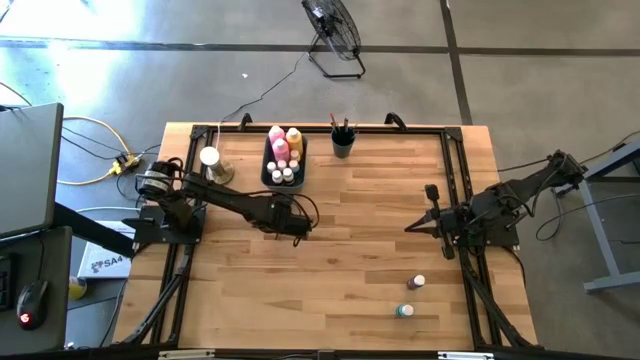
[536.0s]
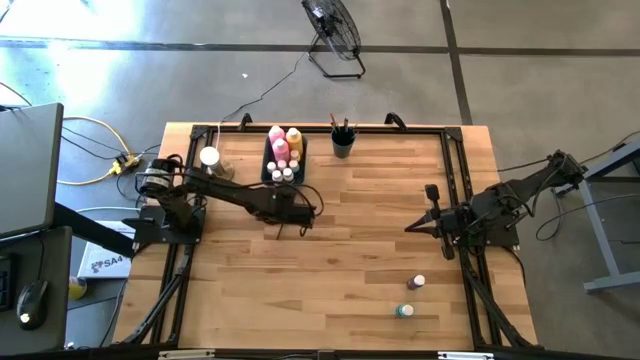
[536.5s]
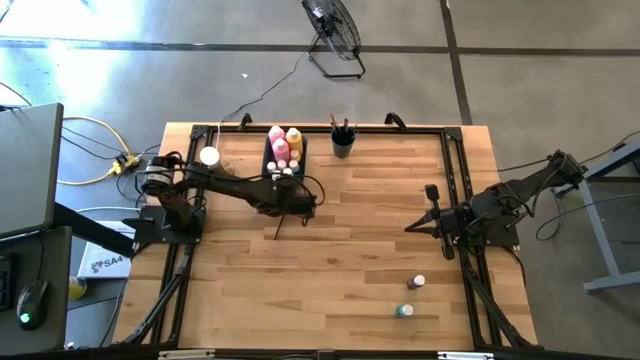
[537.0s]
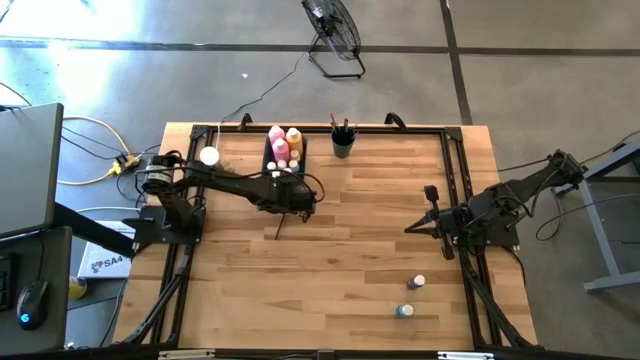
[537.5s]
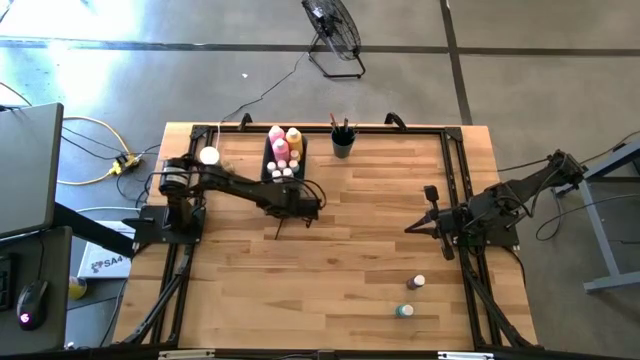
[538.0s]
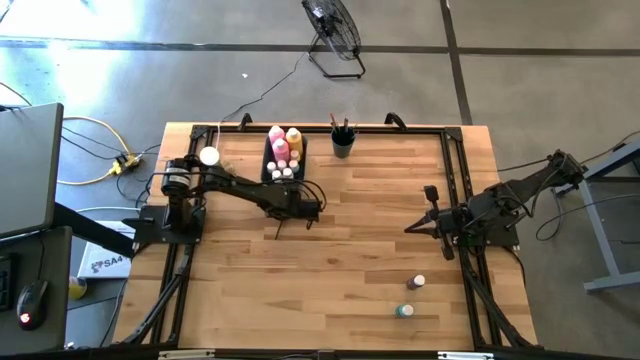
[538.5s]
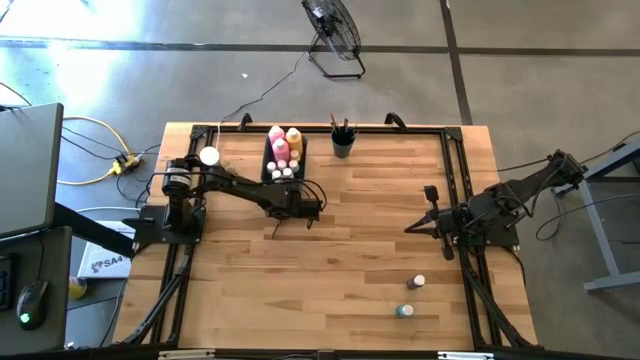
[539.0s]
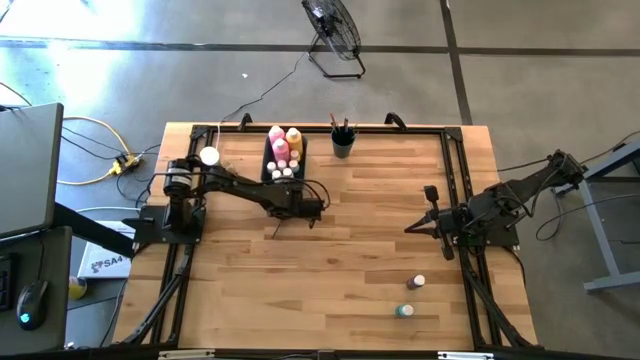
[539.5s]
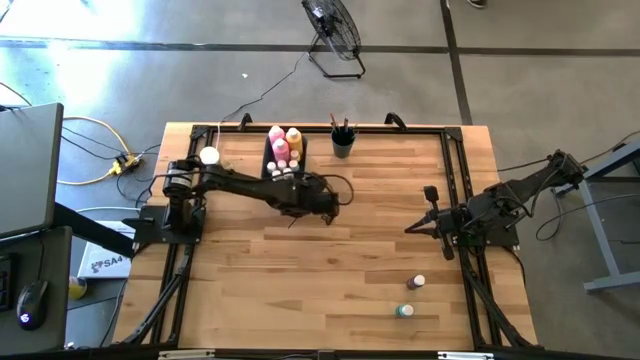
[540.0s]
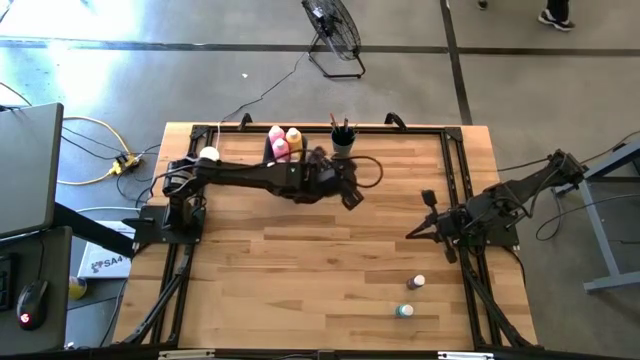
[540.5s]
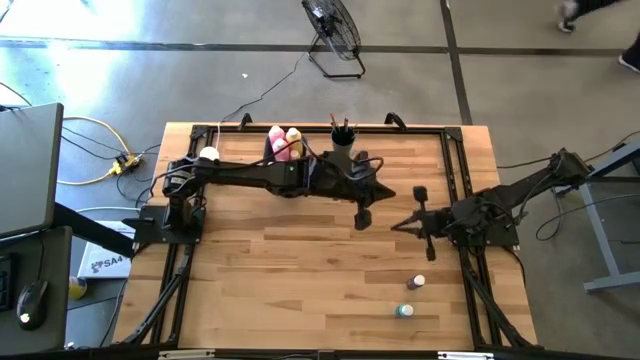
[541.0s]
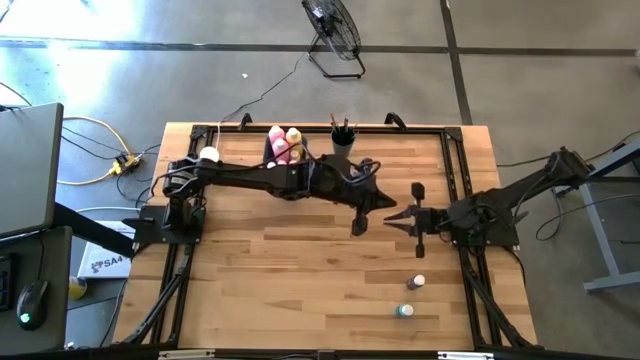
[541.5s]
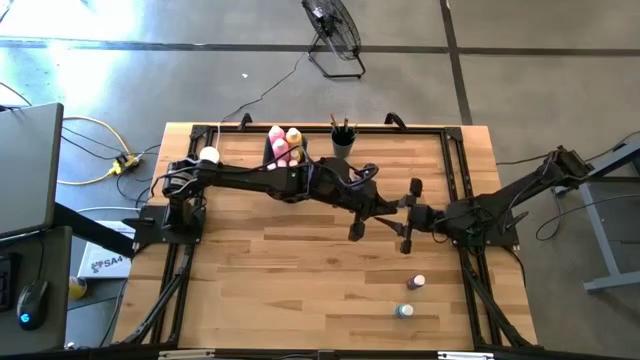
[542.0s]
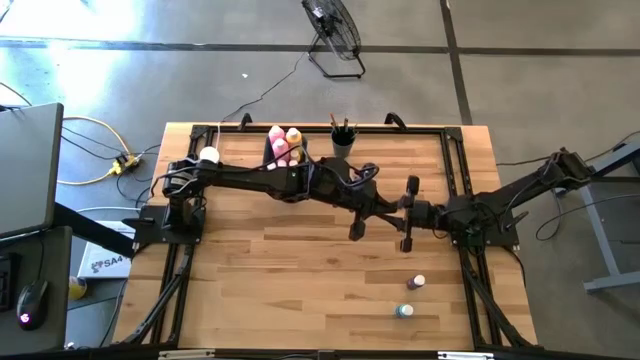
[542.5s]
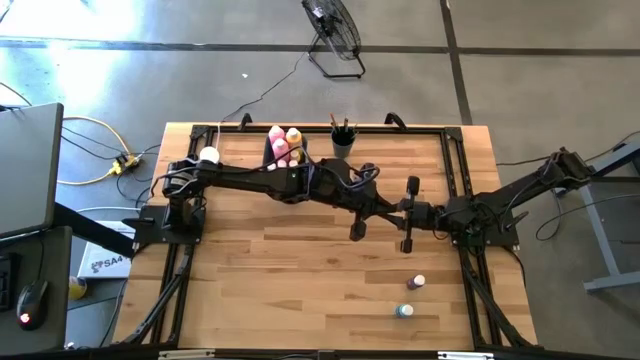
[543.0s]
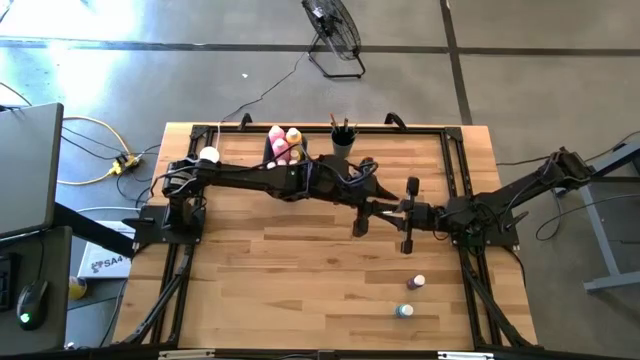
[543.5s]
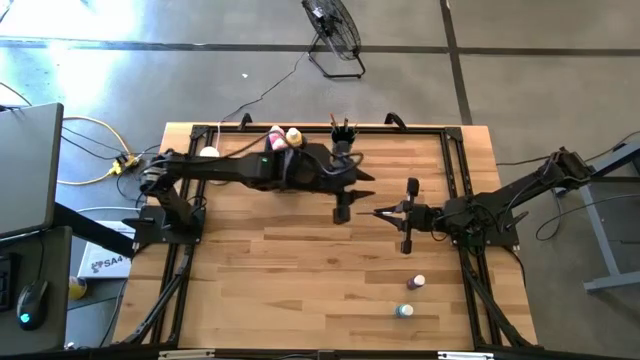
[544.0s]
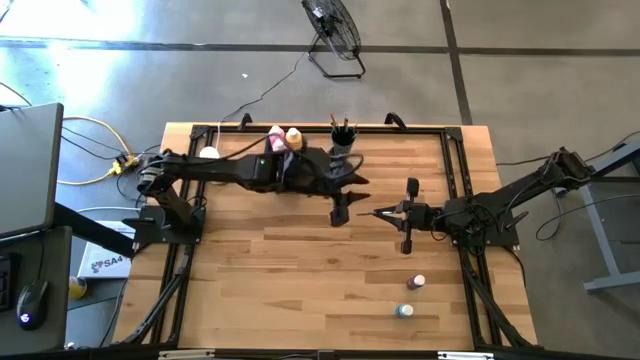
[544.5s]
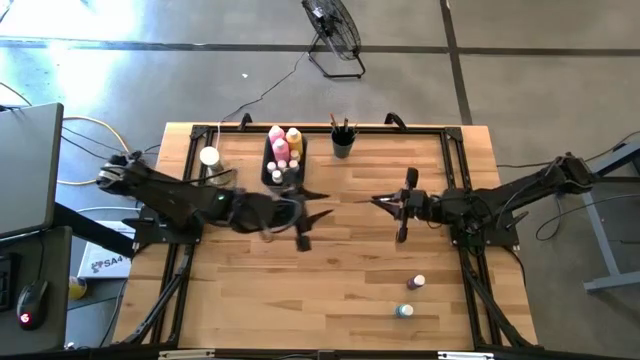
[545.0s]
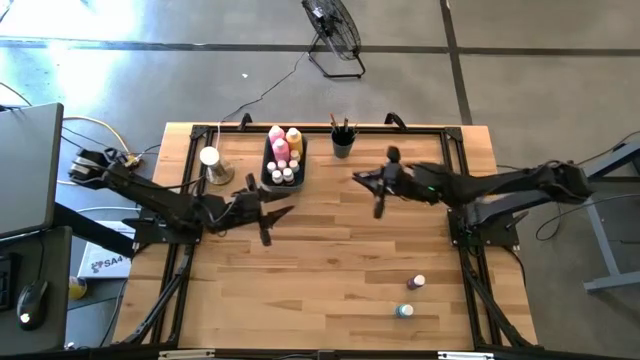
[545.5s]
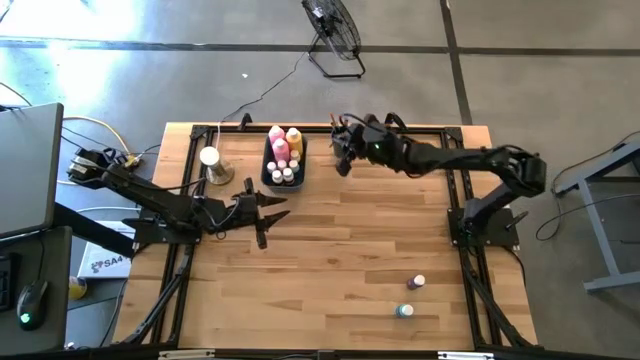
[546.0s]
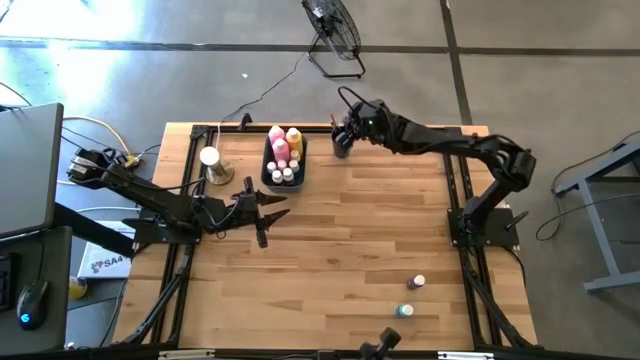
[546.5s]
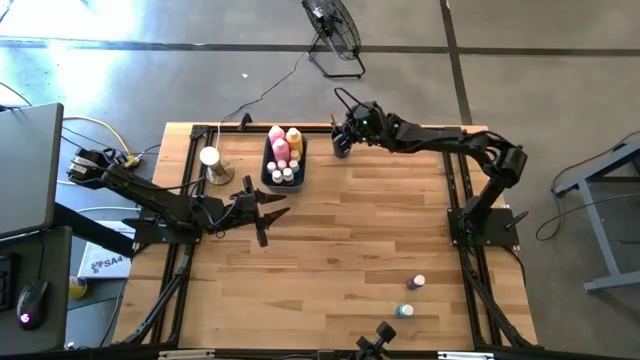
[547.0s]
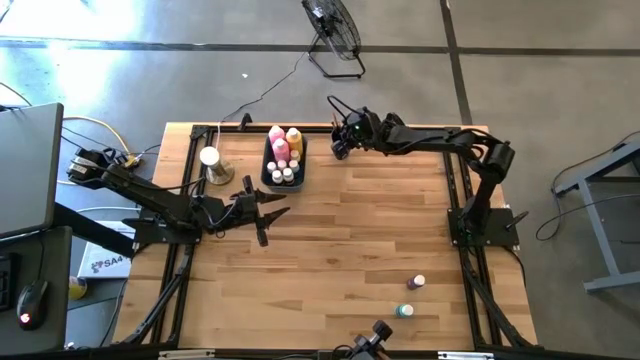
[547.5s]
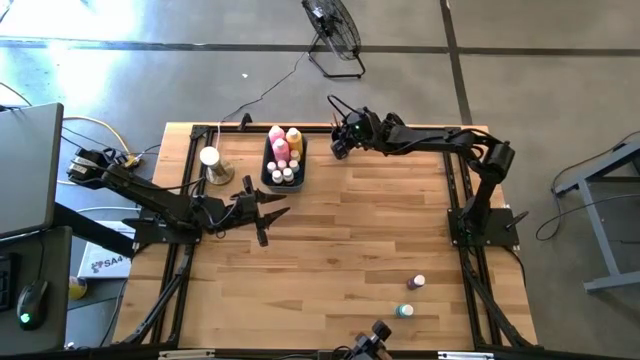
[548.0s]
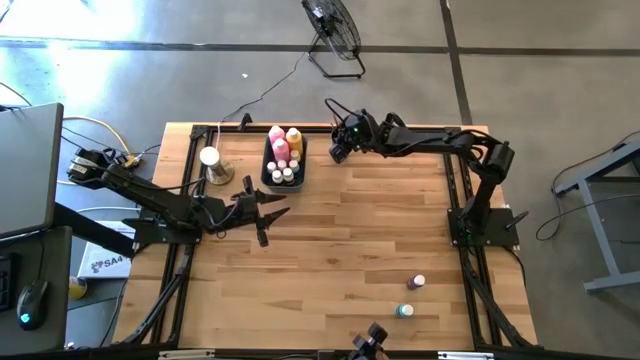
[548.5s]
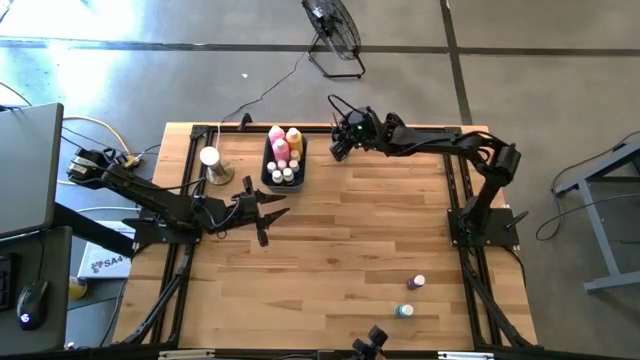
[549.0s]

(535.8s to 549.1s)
Task: Pick & Place Paint Supplies
Put the silver paint brush into the green cup
